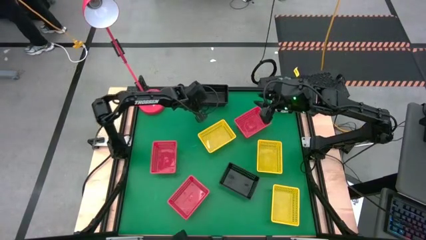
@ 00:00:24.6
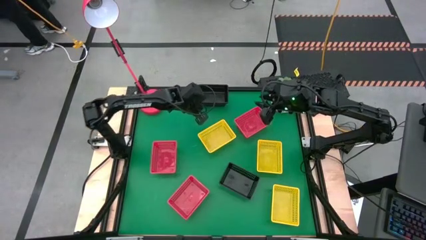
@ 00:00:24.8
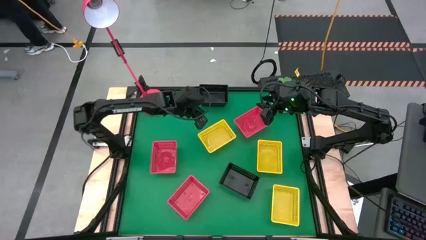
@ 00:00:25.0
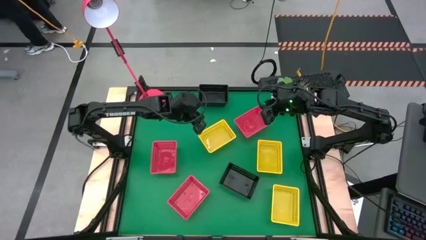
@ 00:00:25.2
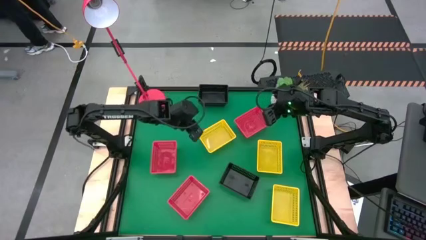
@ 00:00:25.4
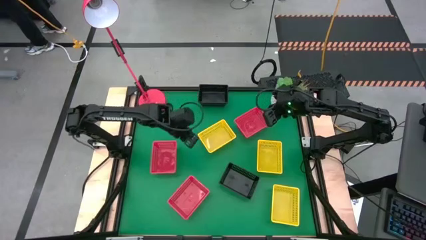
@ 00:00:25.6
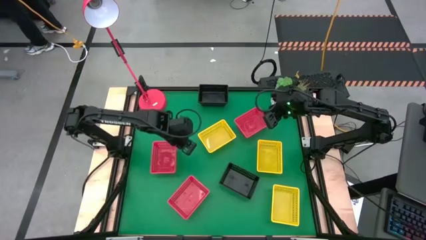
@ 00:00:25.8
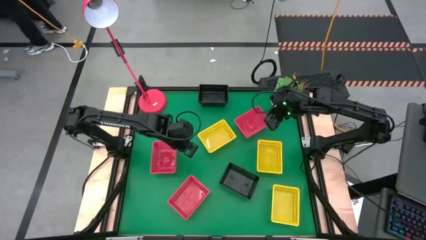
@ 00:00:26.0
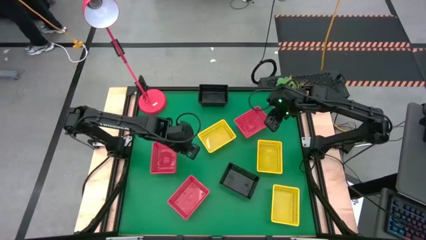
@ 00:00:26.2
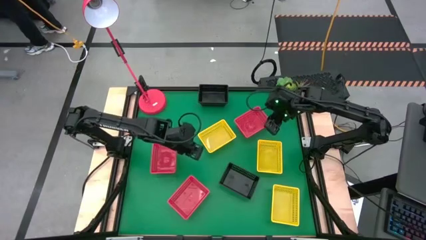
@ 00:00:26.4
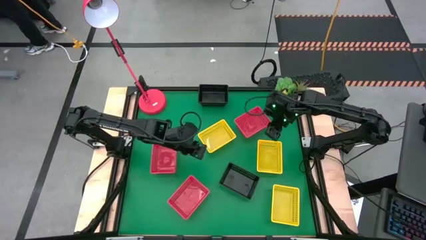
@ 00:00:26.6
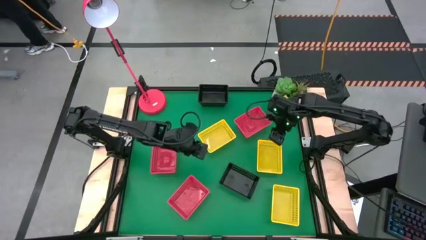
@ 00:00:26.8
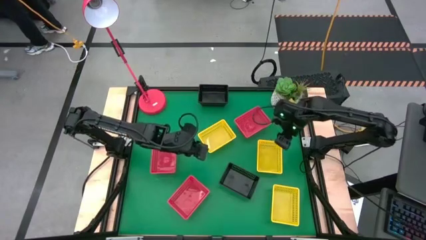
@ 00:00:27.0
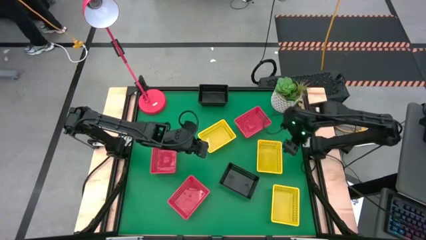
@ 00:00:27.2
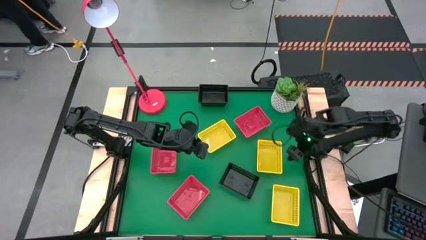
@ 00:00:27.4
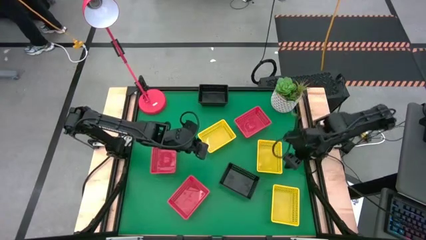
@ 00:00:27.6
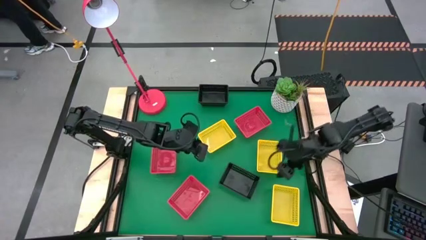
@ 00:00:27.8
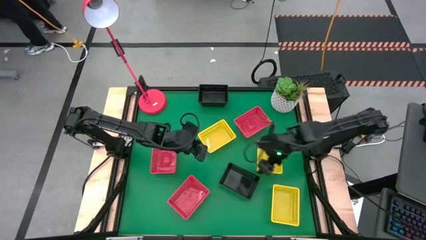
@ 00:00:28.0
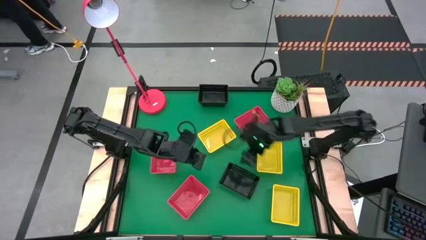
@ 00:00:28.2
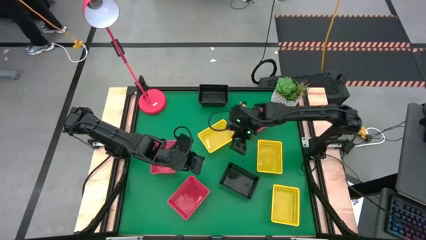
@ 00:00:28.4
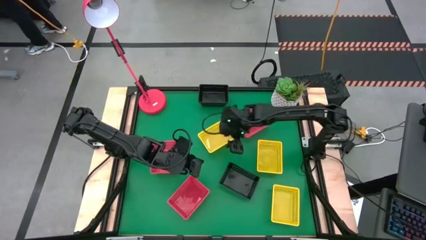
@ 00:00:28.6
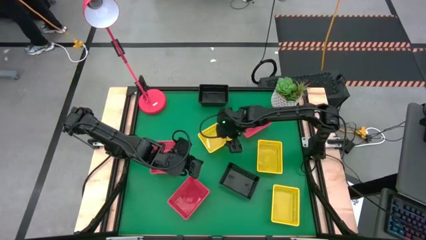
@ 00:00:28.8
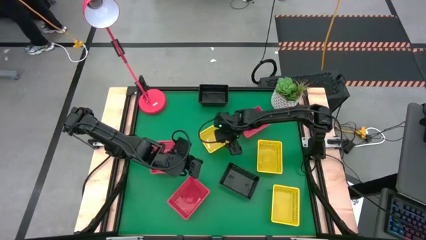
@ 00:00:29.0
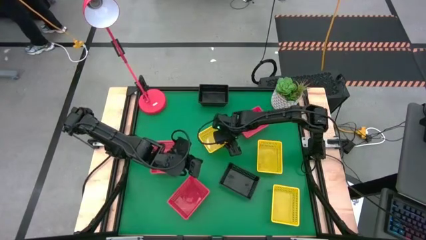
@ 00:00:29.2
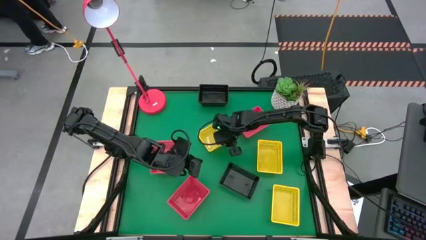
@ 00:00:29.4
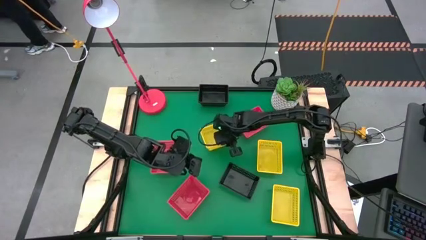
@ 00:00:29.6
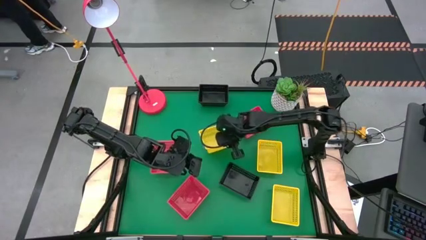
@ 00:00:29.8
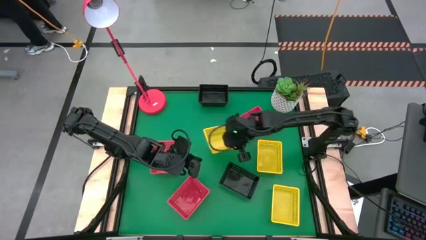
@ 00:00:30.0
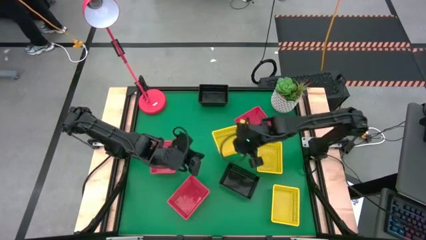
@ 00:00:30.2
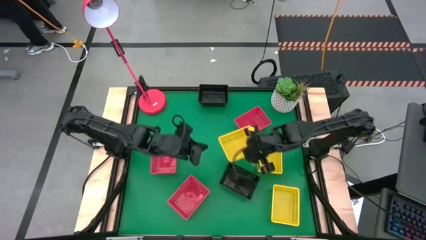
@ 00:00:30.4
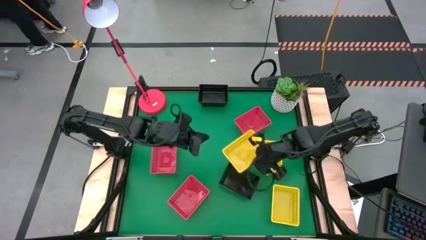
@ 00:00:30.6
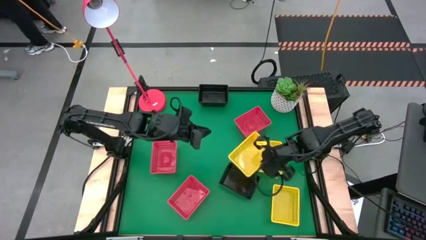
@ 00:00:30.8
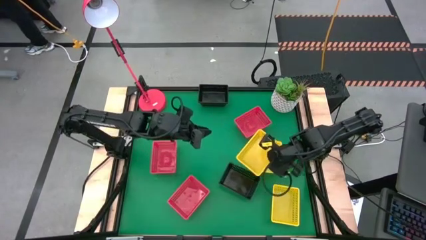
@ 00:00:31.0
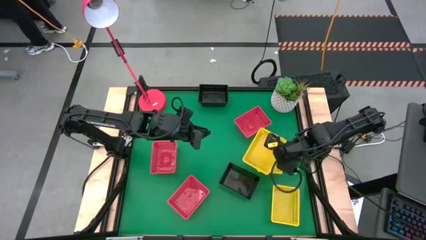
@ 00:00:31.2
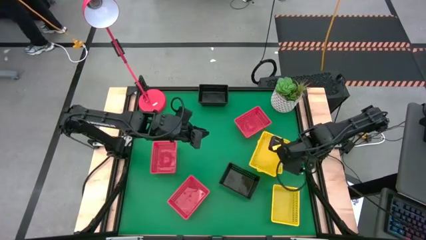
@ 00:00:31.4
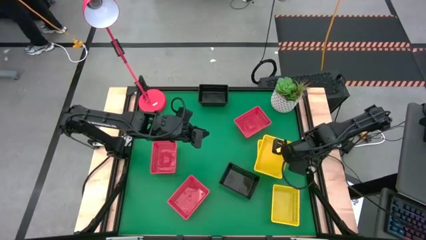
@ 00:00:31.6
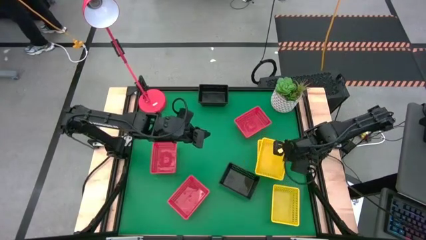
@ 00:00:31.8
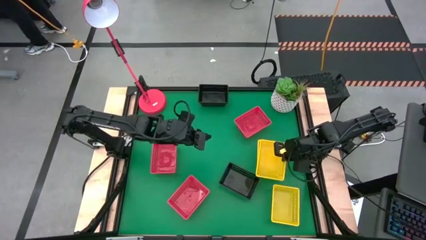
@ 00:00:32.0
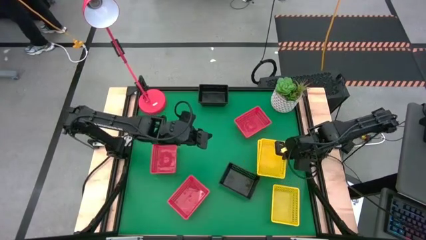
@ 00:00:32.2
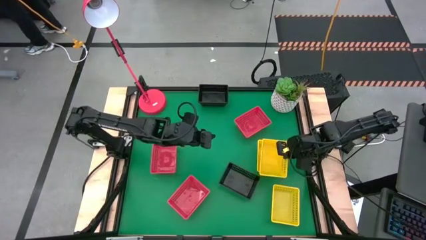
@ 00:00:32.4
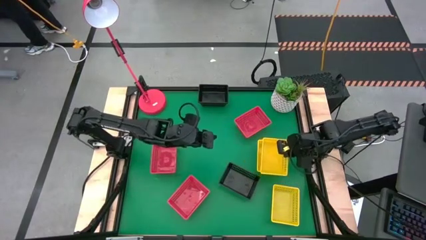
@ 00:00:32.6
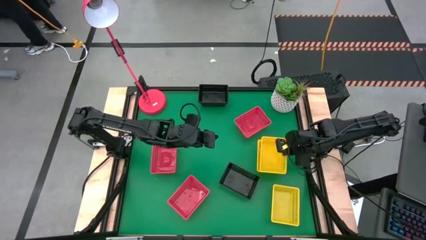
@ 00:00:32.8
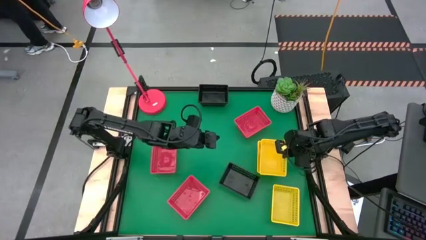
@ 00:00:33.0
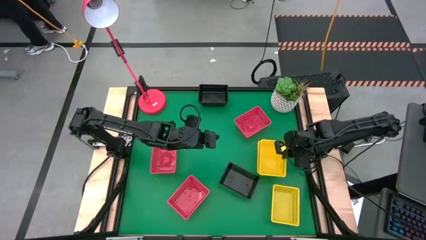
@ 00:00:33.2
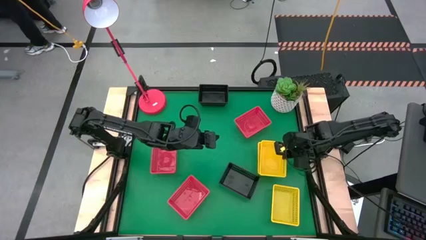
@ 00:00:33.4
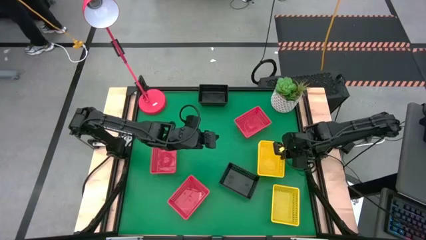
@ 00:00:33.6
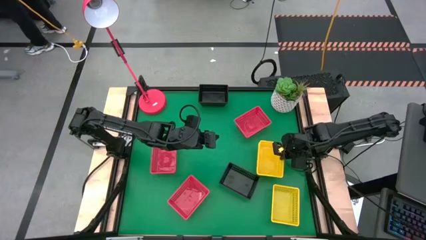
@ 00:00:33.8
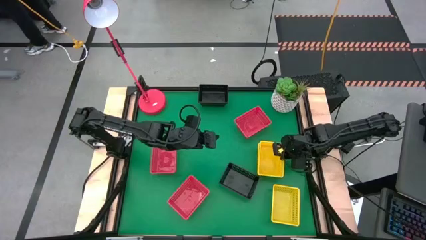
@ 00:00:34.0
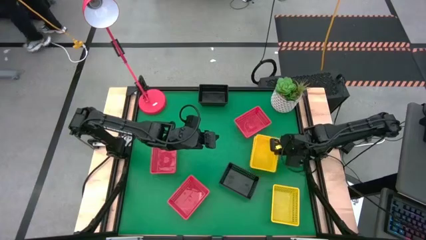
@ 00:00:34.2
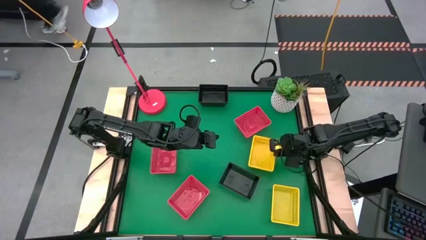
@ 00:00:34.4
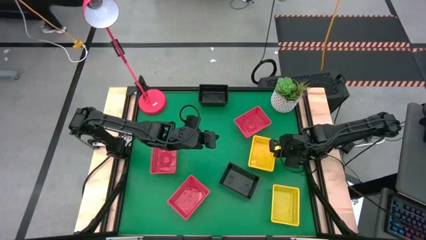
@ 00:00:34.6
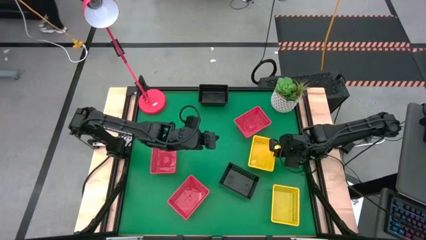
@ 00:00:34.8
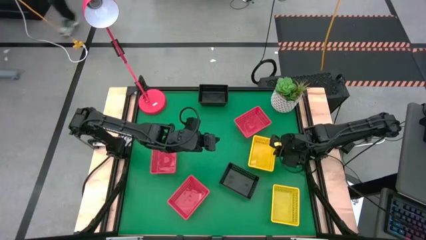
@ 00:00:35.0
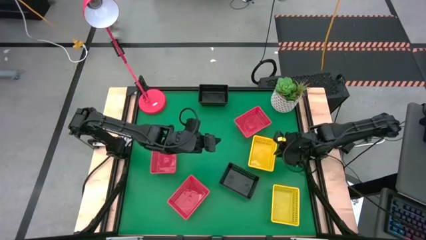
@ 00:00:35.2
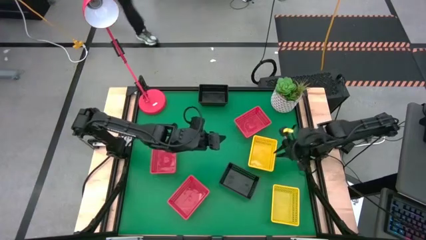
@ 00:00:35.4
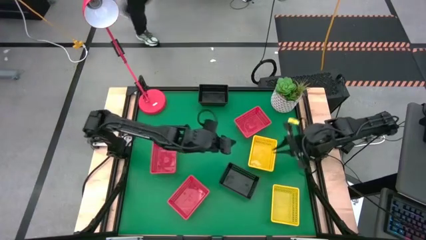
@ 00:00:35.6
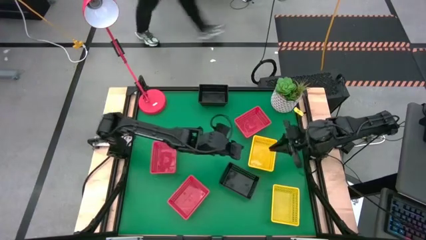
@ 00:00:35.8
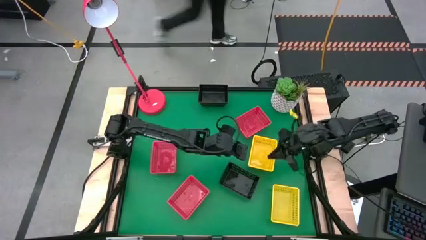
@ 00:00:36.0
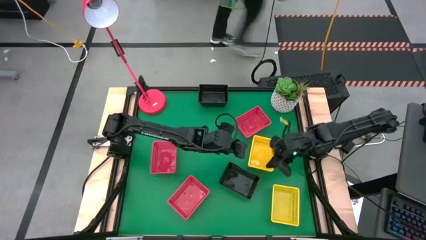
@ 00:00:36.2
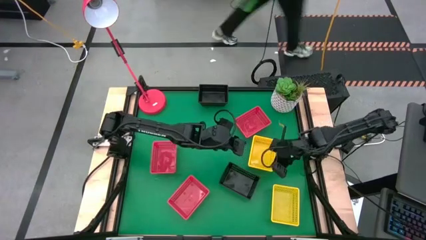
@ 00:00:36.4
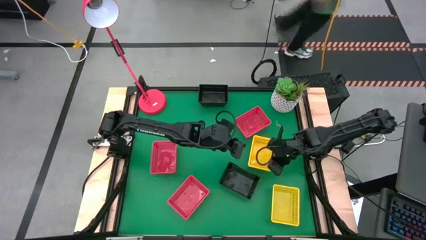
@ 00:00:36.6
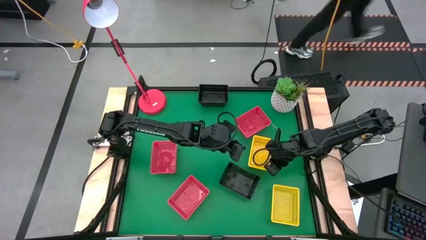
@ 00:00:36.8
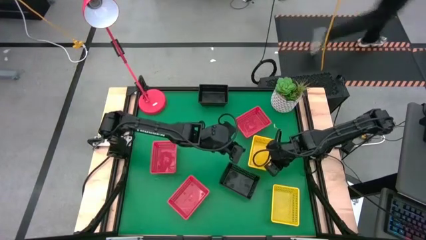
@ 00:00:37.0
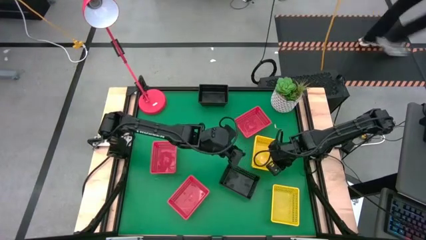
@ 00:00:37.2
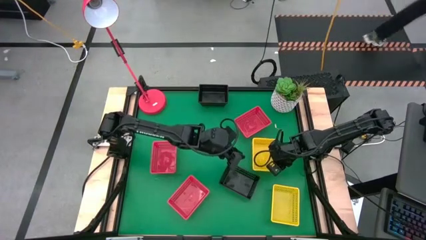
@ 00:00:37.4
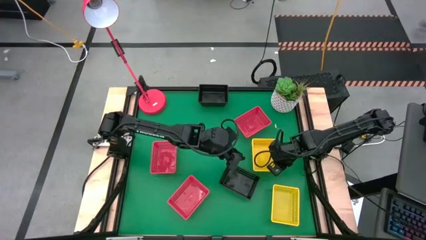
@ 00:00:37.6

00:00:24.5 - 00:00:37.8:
Stack the top left yellow bin on the top right yellow bin

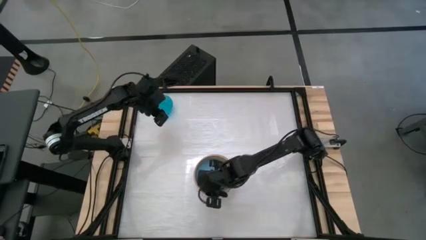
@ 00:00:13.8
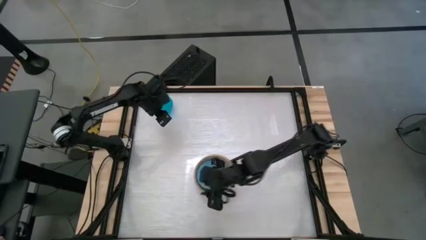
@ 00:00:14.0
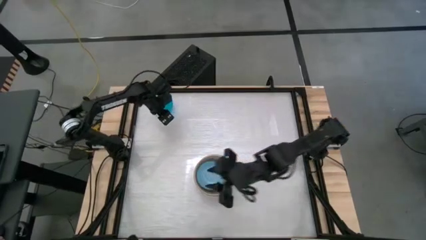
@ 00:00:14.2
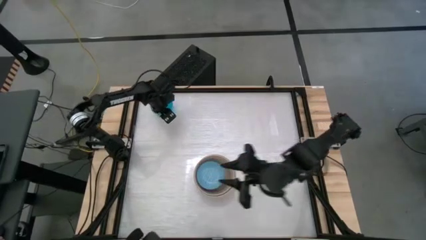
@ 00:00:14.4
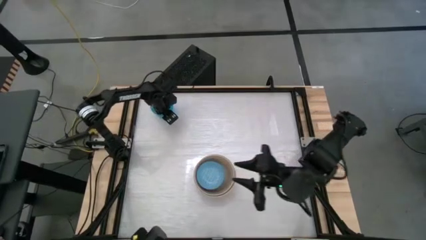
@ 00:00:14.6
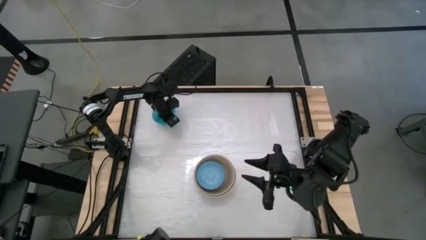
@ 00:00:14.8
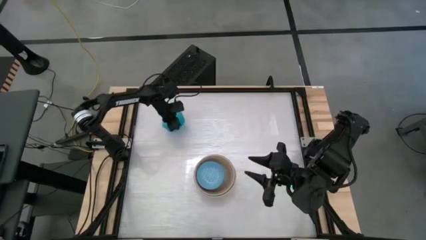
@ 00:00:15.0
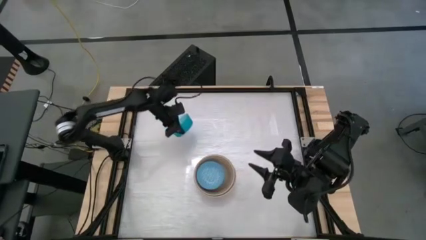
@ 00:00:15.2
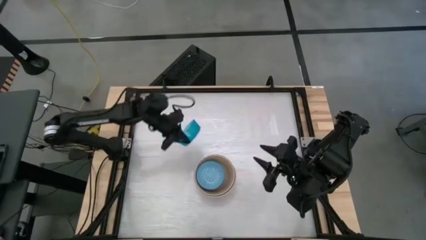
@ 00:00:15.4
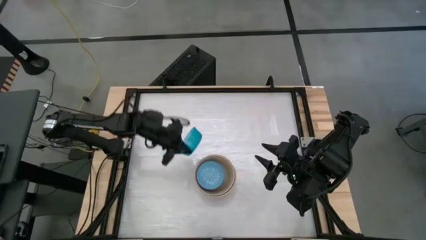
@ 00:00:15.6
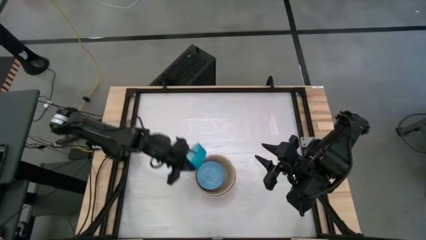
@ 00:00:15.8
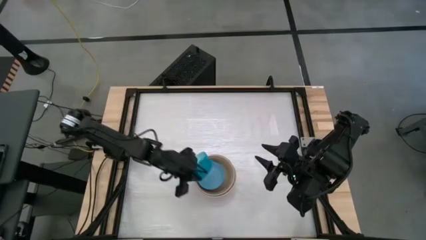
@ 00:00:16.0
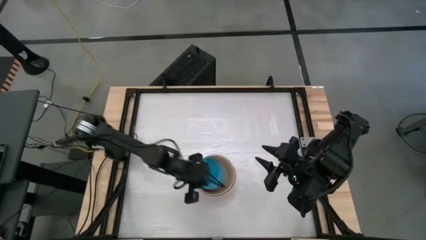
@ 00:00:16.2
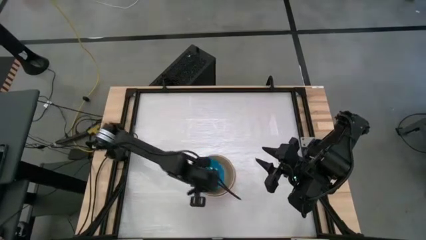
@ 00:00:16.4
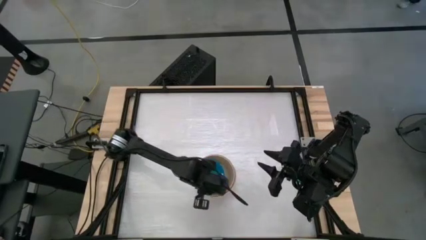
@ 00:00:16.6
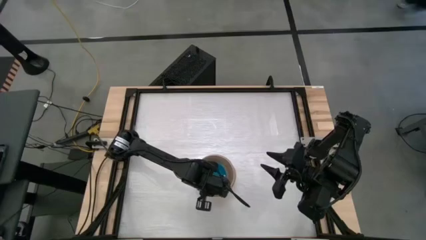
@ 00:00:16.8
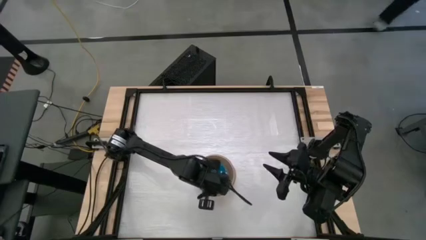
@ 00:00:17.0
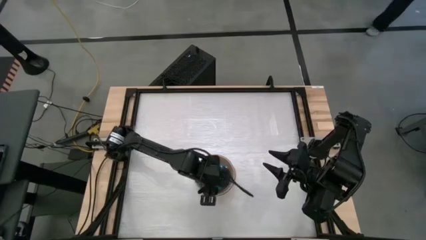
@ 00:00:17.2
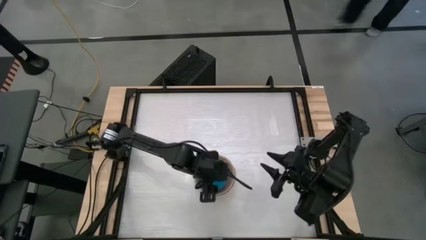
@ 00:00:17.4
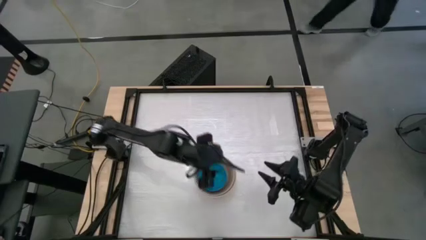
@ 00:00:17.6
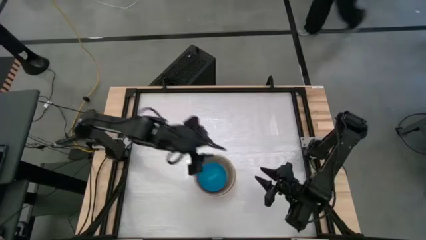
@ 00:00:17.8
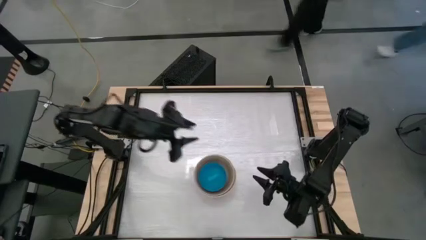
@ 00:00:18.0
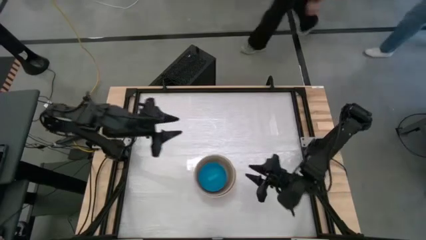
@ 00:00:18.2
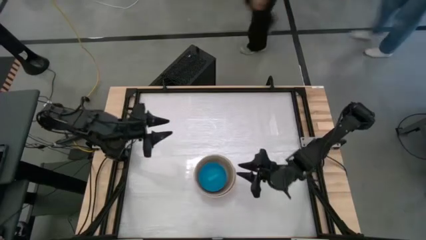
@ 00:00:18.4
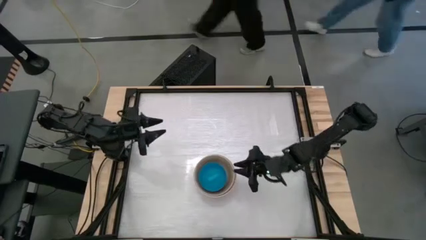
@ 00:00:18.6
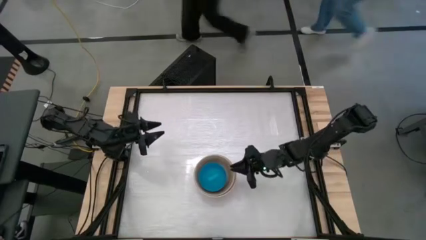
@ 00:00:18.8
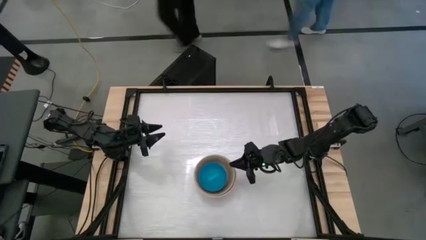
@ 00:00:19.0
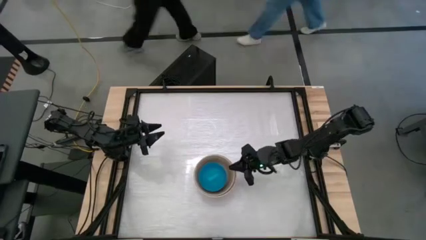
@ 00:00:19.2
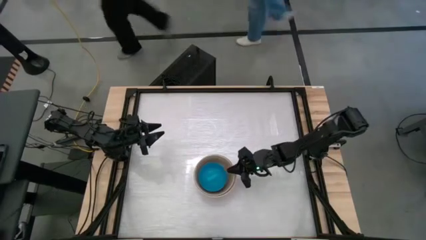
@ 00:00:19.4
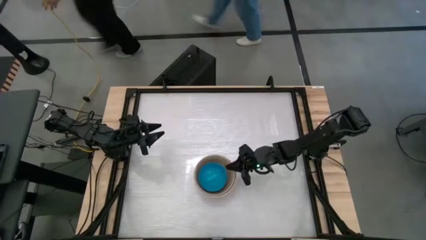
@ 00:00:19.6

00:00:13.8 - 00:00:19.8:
Stack the light blue bowl on top of the blue patterned bowl
